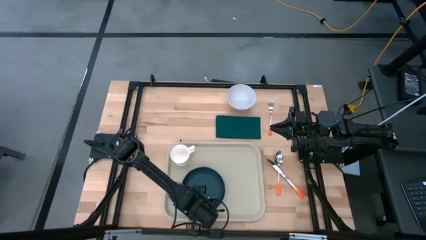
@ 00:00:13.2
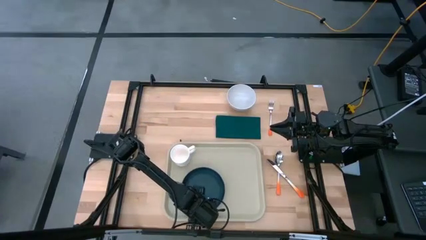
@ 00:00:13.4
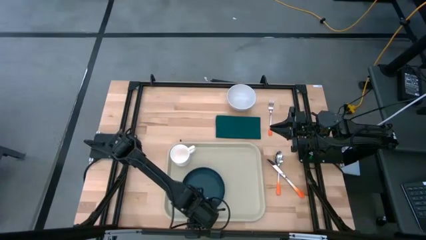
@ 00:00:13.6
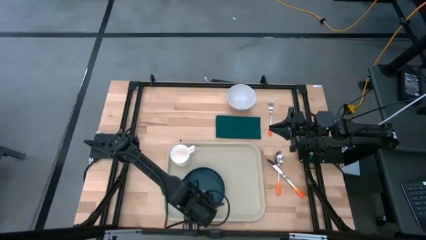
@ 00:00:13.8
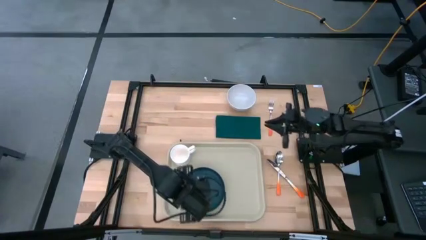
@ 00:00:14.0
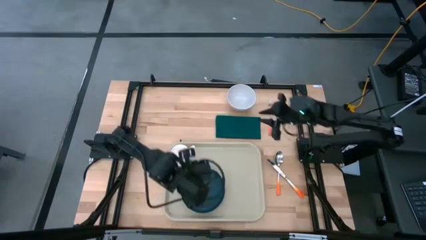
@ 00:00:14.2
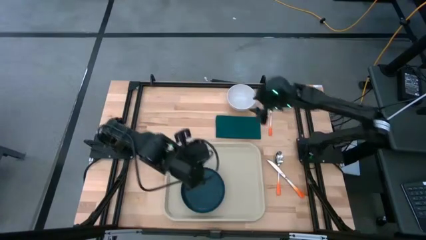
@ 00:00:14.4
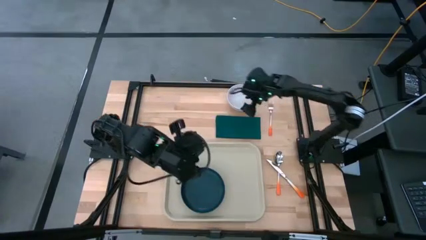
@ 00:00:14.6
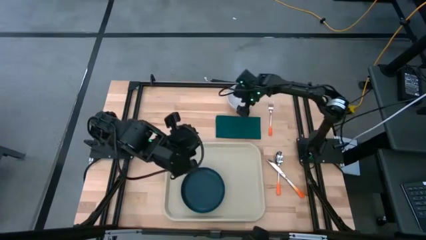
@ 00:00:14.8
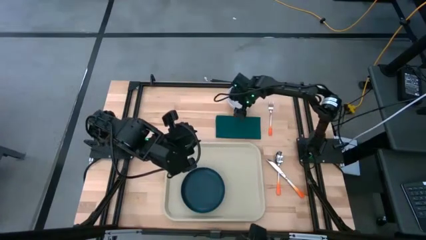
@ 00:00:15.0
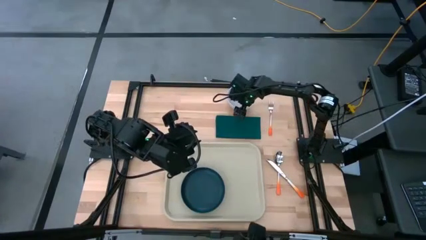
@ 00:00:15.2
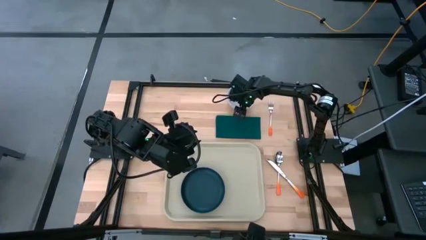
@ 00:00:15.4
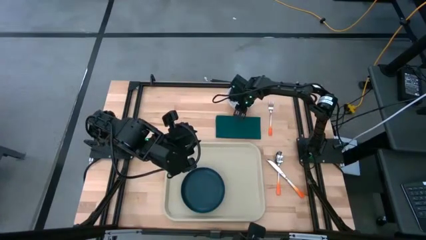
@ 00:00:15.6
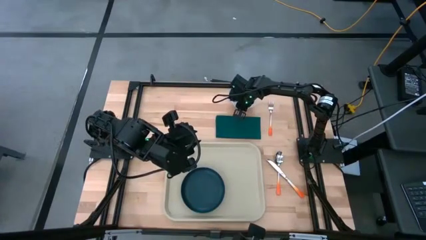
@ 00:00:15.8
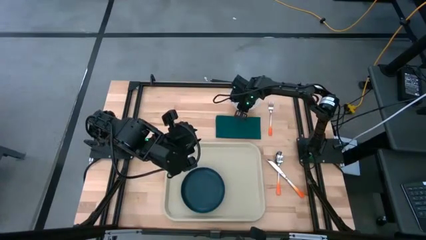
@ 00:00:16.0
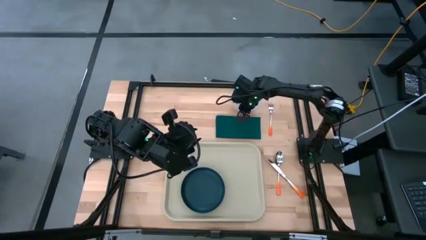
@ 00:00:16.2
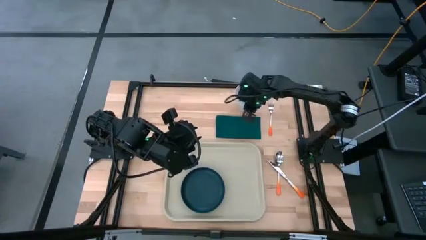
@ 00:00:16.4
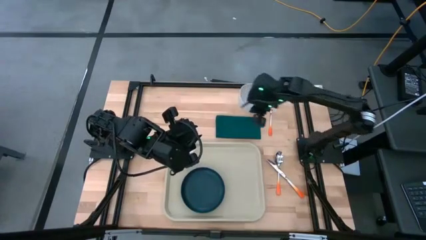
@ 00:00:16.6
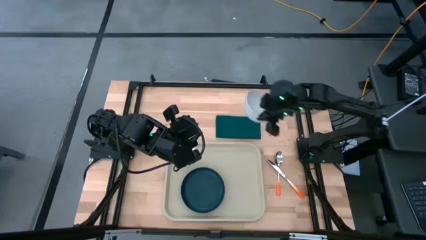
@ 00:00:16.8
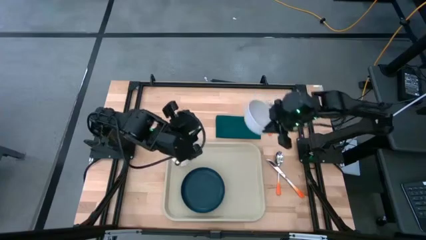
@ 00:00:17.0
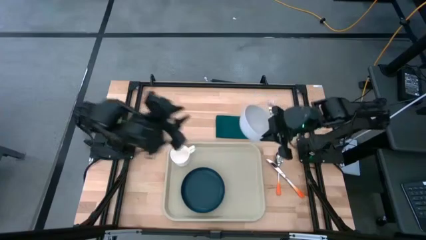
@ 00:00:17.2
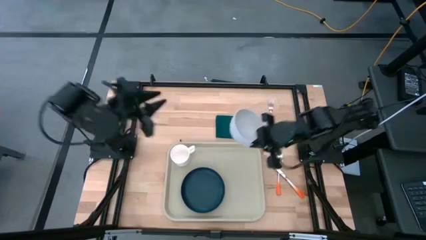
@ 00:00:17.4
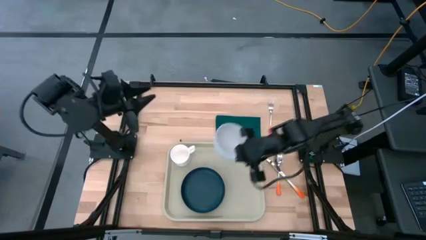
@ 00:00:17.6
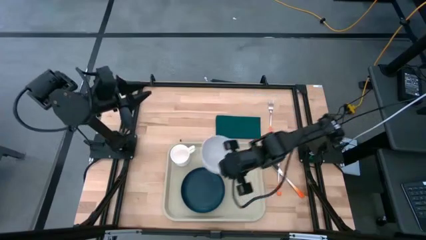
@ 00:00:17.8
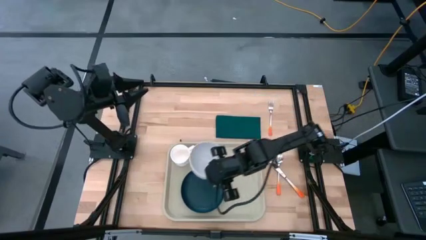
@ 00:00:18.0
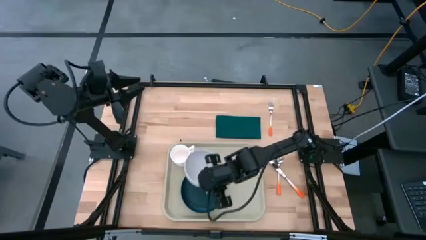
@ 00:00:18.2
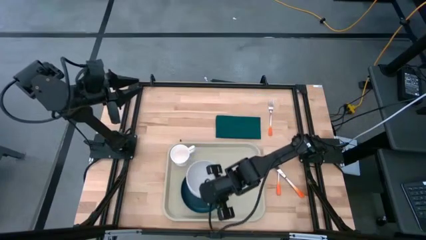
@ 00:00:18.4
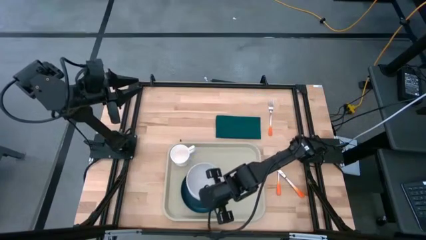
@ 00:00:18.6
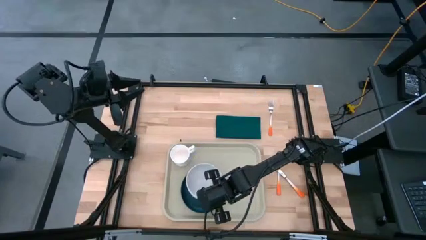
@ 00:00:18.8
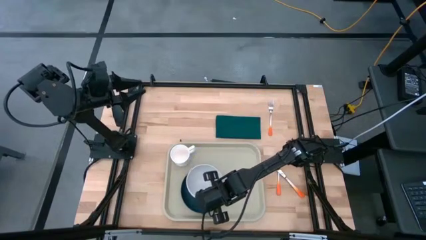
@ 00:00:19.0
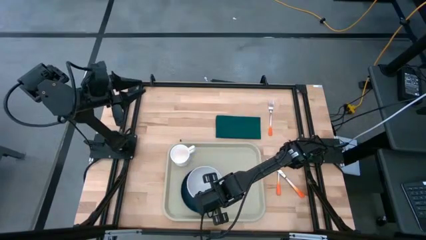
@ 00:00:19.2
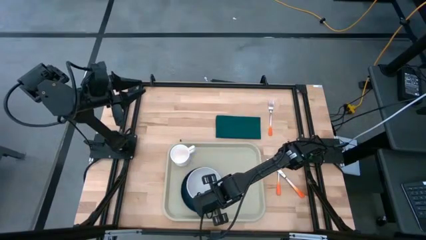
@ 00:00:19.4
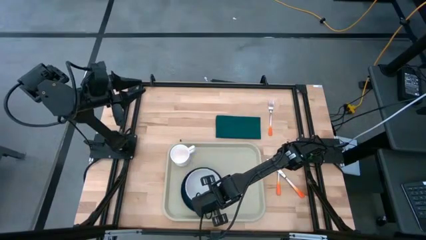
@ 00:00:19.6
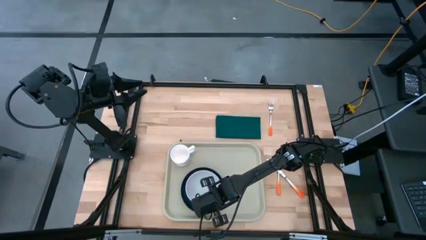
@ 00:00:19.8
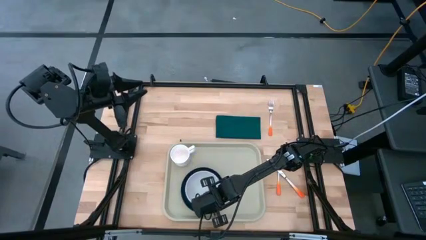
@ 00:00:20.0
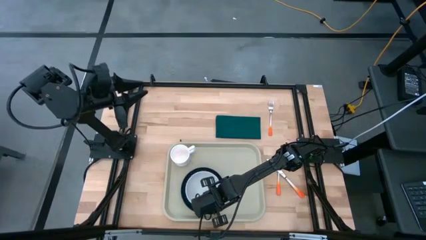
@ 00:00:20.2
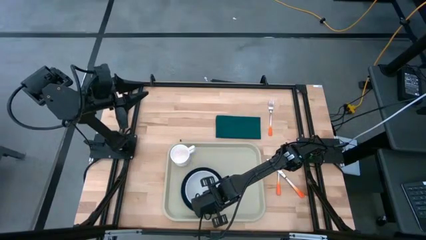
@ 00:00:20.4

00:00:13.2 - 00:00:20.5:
Task: Set up tray
Put the white bowl on top of the black plate on the white tray

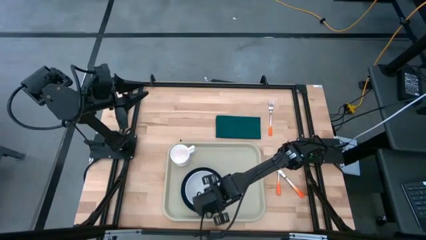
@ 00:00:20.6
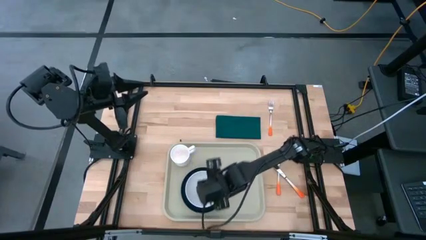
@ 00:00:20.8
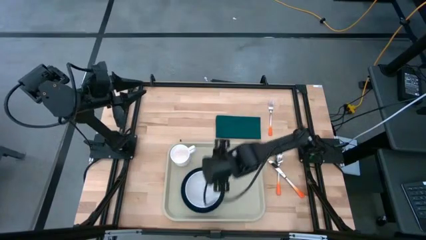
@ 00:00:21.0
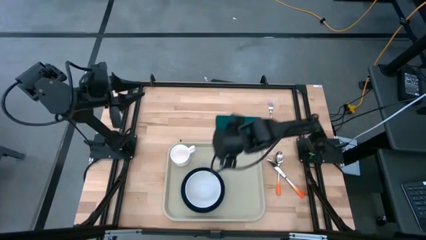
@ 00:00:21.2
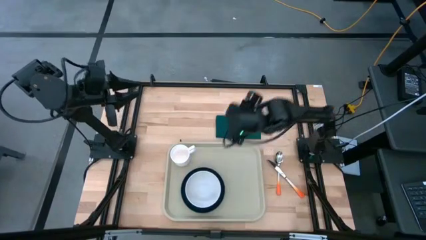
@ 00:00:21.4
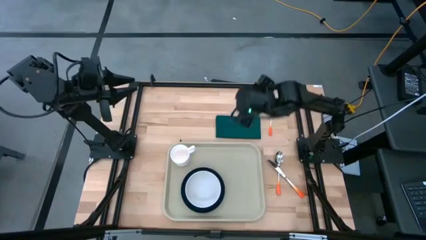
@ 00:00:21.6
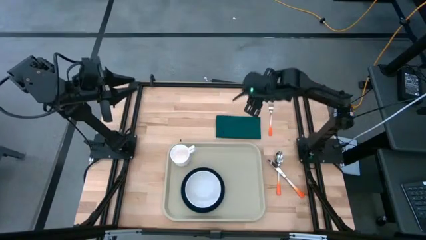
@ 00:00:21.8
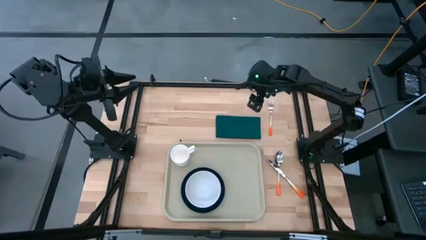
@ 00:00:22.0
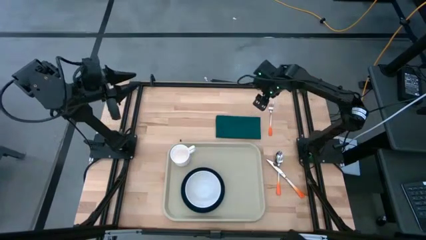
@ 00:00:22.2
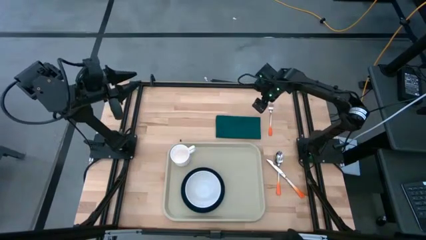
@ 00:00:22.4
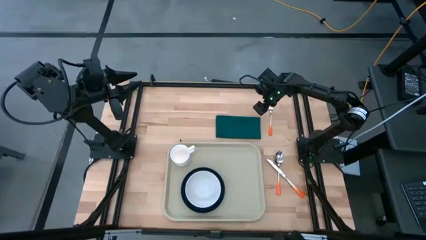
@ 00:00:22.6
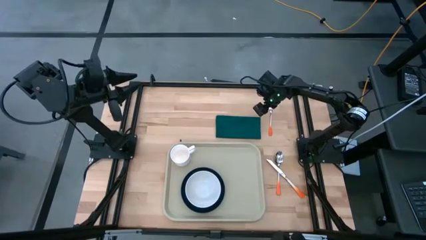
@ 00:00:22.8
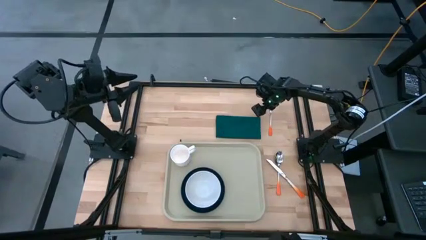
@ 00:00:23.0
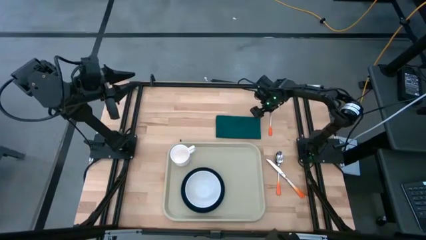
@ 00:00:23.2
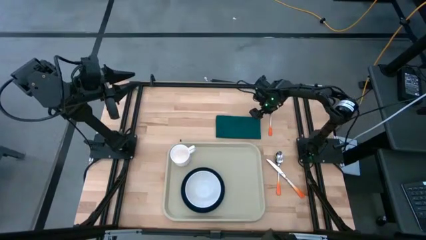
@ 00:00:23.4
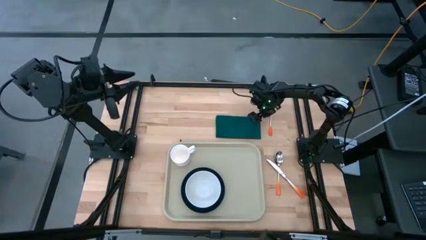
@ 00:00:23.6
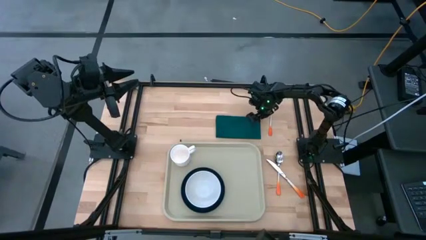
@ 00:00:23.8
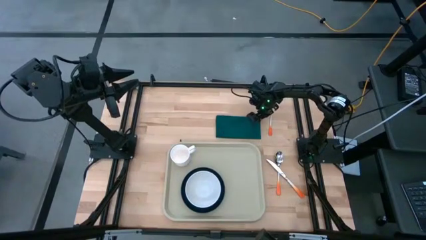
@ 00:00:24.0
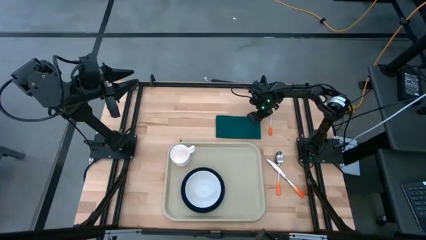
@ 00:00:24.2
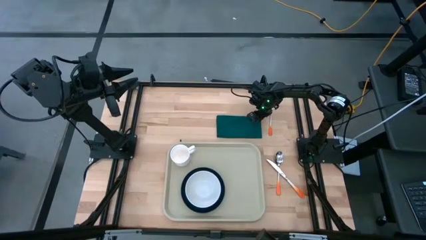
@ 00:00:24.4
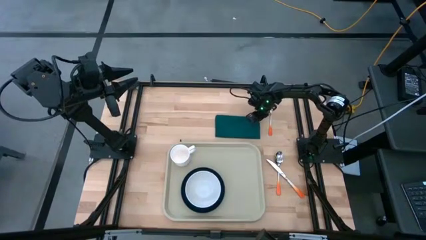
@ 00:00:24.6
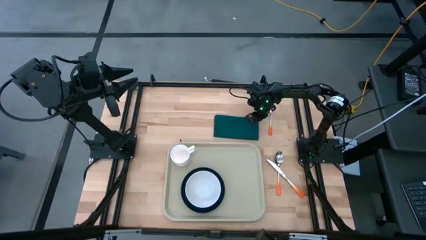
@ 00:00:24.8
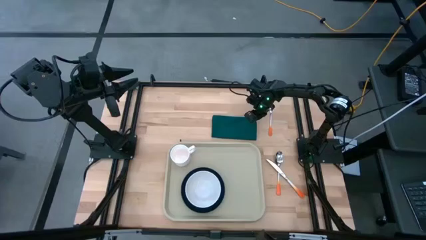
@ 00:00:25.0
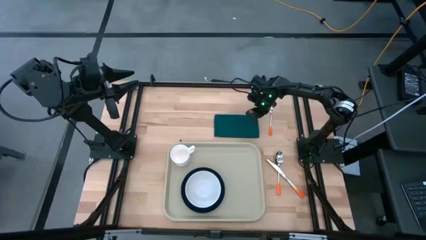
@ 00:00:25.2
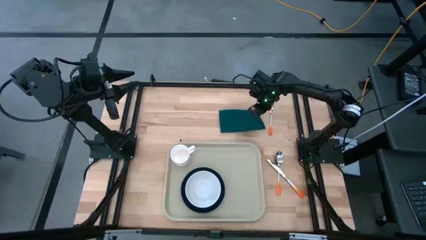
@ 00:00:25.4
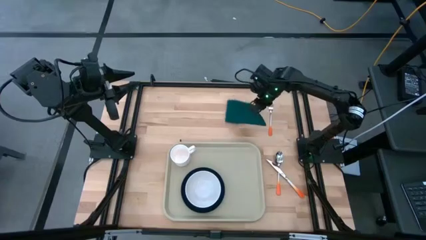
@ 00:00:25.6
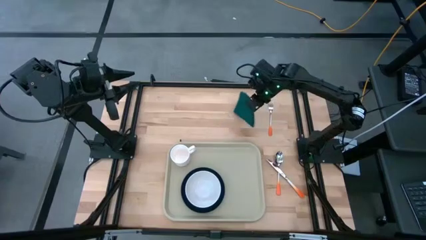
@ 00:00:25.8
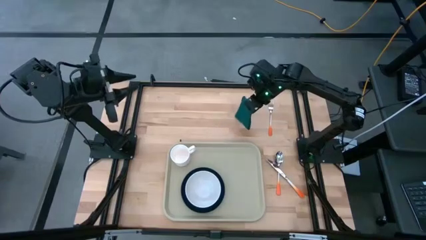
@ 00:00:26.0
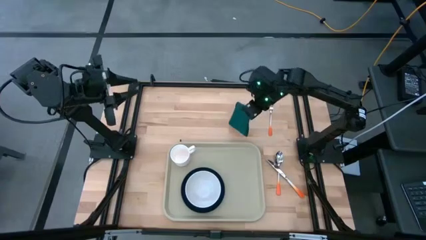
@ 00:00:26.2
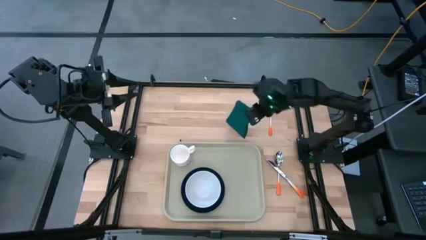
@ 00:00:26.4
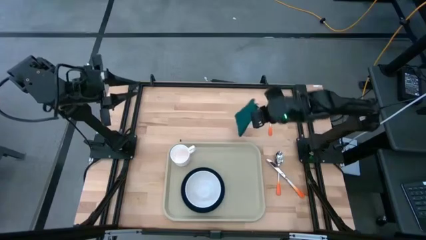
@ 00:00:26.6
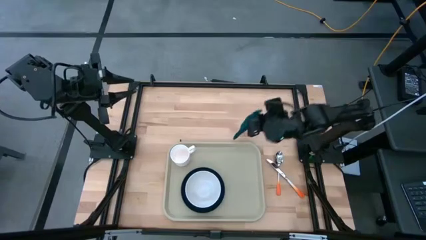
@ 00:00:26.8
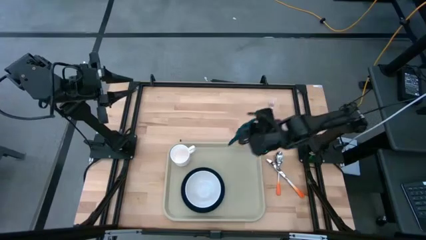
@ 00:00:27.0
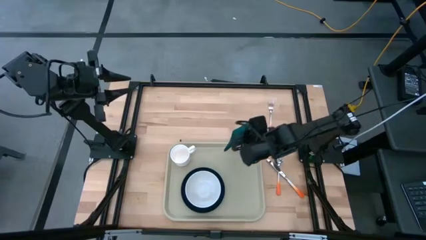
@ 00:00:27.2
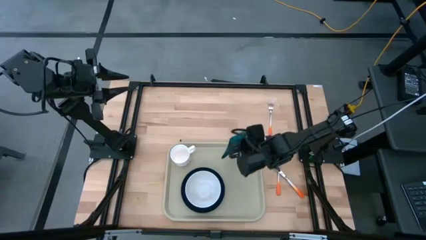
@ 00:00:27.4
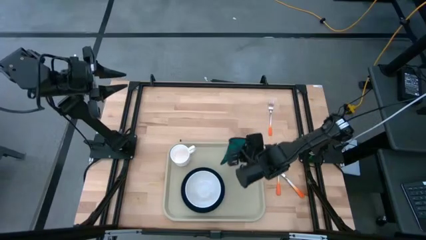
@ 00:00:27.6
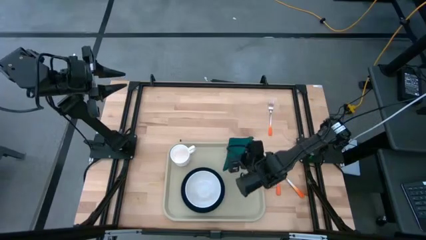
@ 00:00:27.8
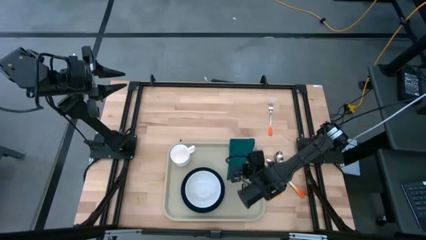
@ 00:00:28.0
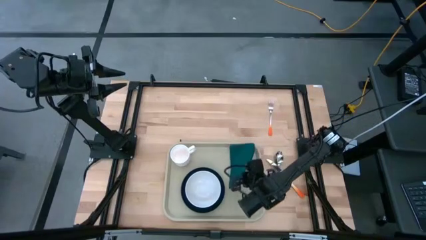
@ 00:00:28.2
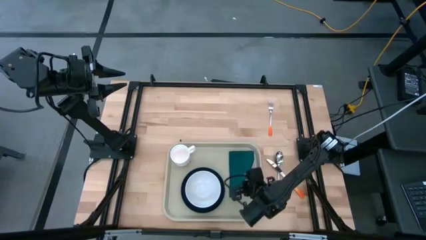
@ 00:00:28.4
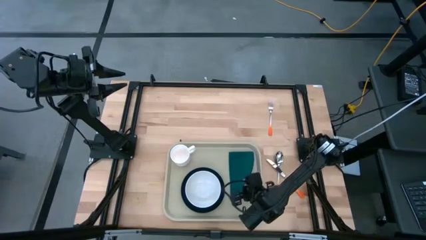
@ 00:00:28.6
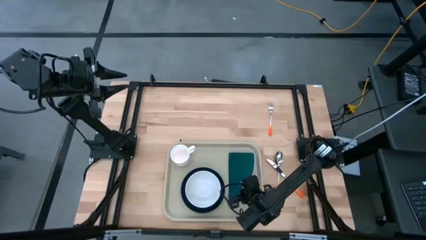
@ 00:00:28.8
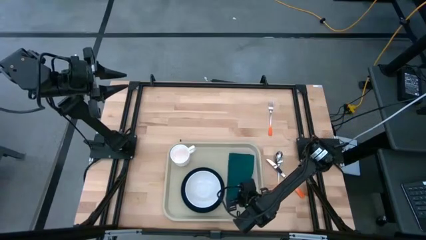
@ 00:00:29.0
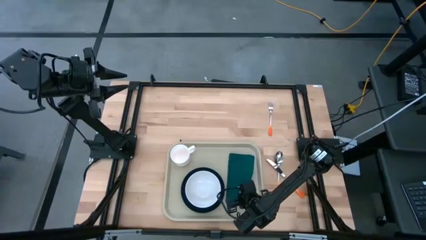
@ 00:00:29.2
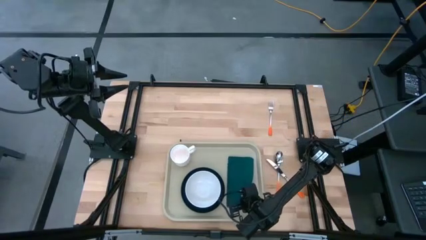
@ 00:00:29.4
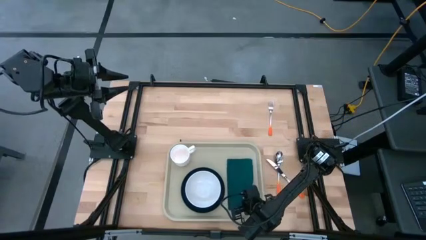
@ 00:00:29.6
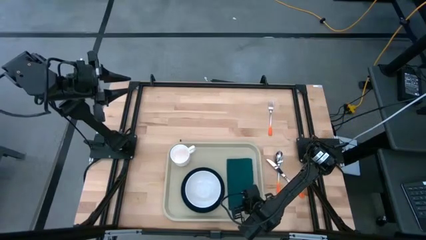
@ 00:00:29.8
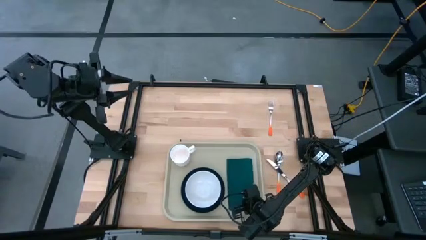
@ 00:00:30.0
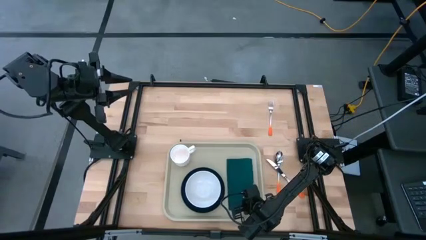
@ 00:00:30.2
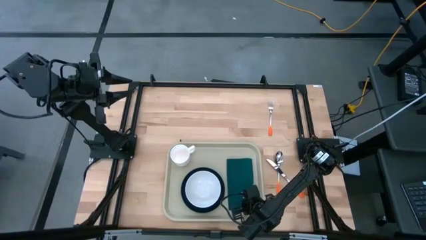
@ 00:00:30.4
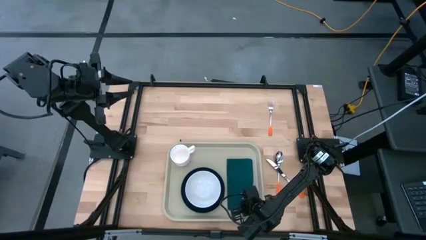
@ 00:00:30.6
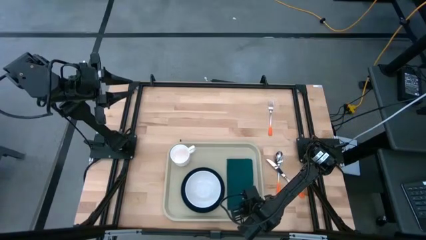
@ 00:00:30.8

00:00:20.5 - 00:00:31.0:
Put the green napkin on the white tray to the right of the black plate
